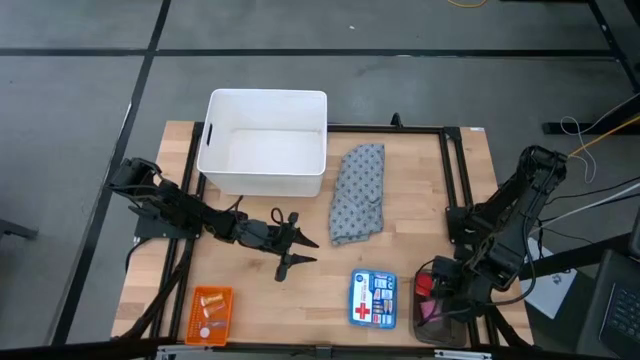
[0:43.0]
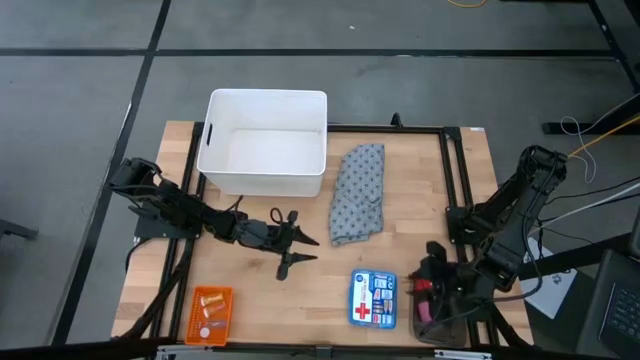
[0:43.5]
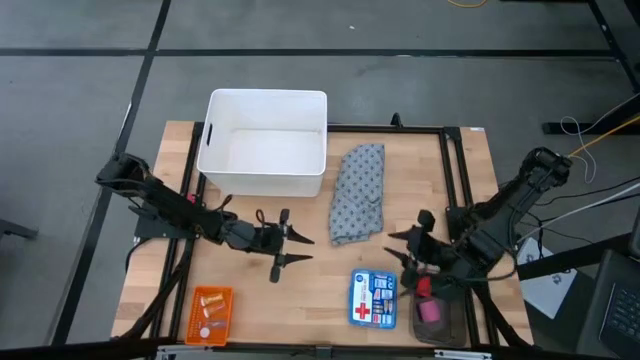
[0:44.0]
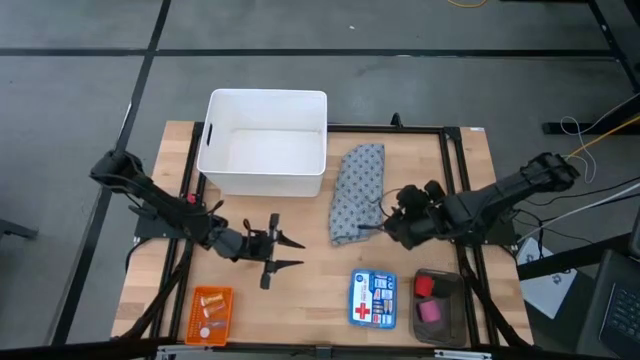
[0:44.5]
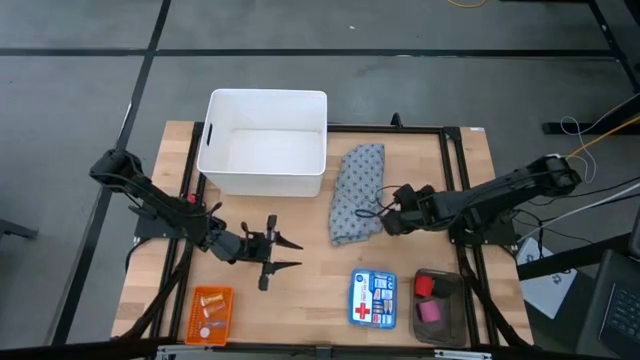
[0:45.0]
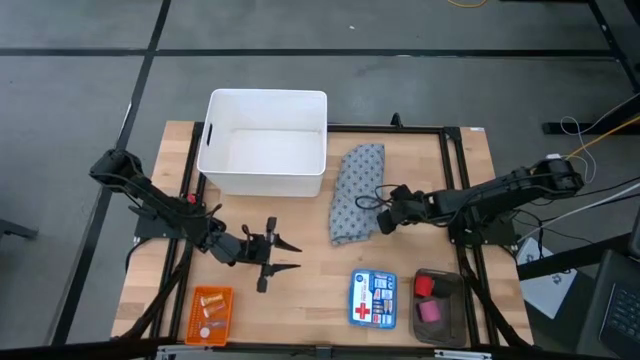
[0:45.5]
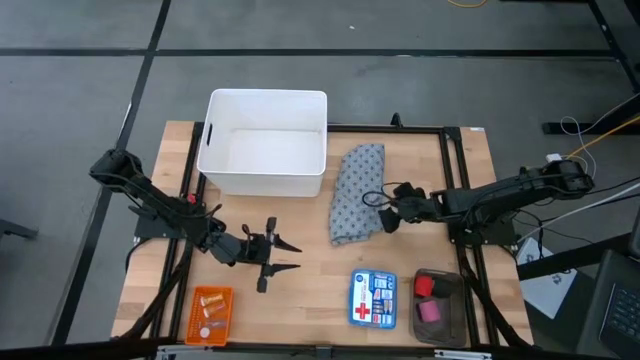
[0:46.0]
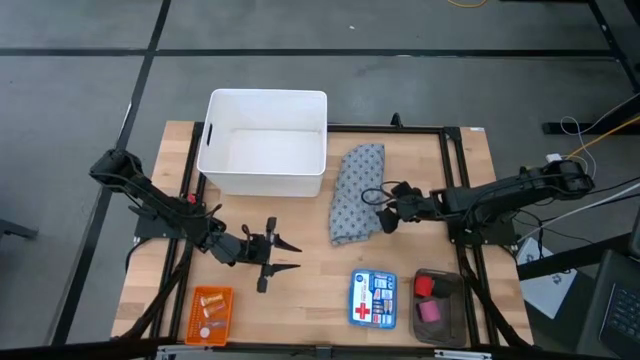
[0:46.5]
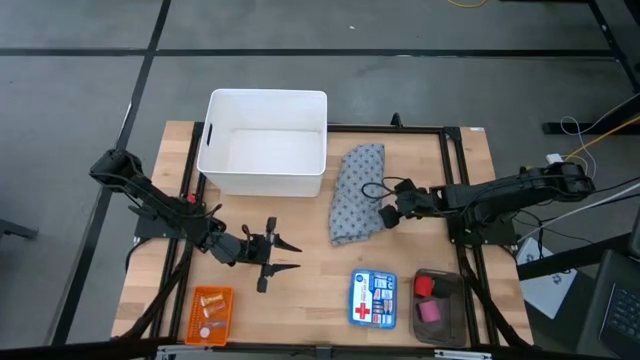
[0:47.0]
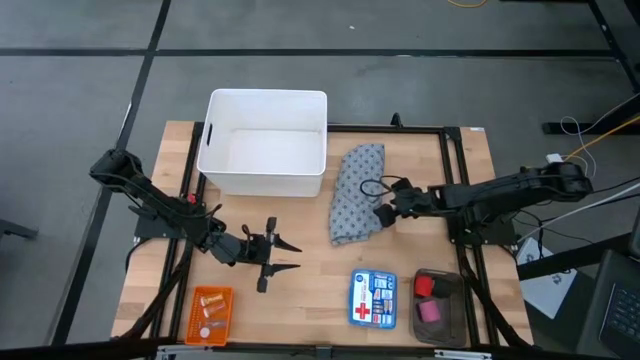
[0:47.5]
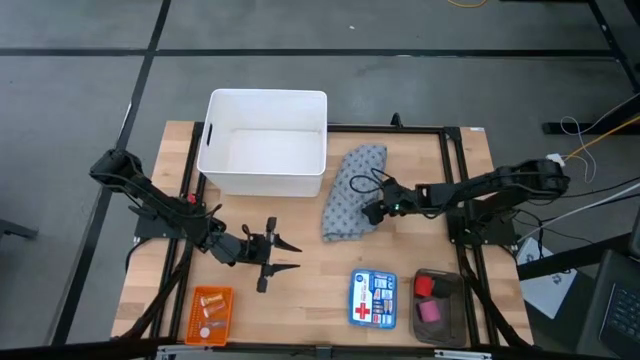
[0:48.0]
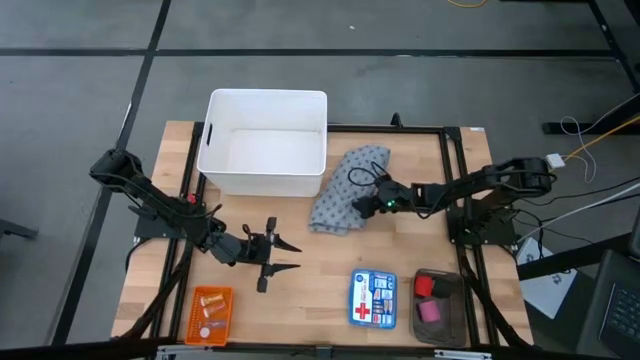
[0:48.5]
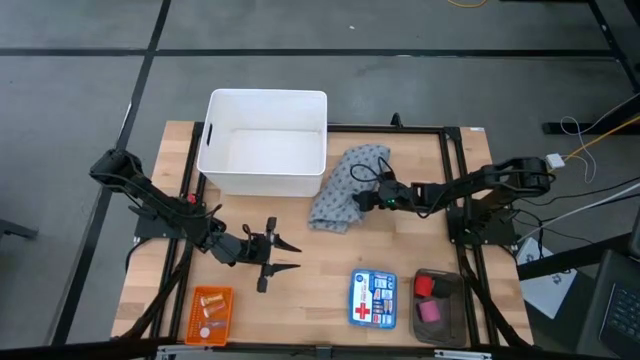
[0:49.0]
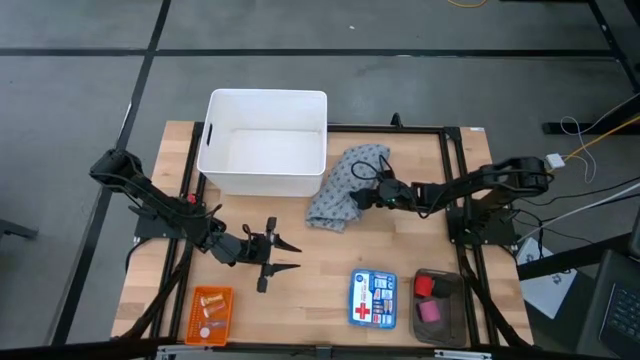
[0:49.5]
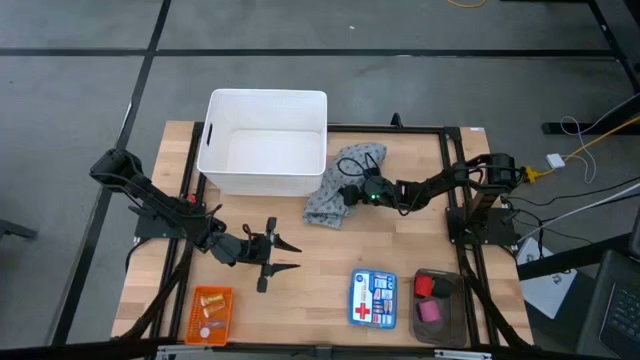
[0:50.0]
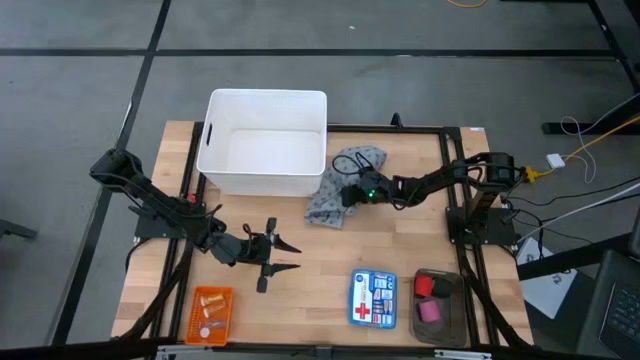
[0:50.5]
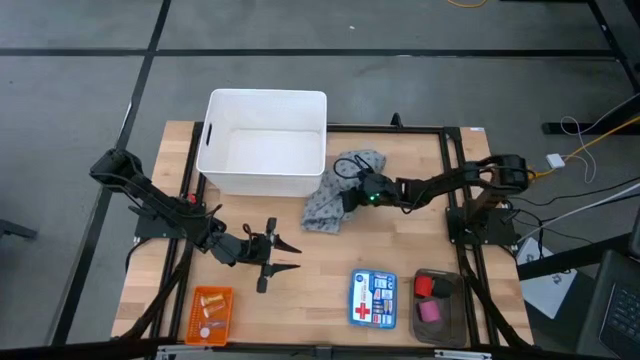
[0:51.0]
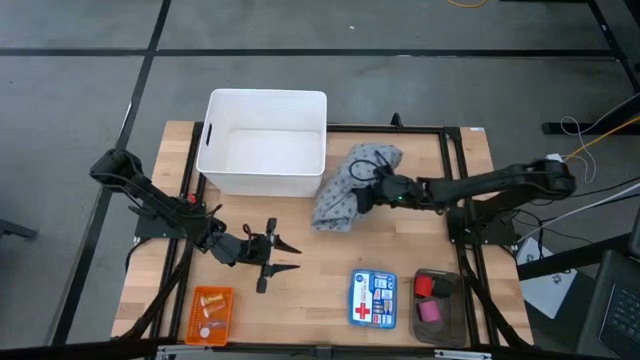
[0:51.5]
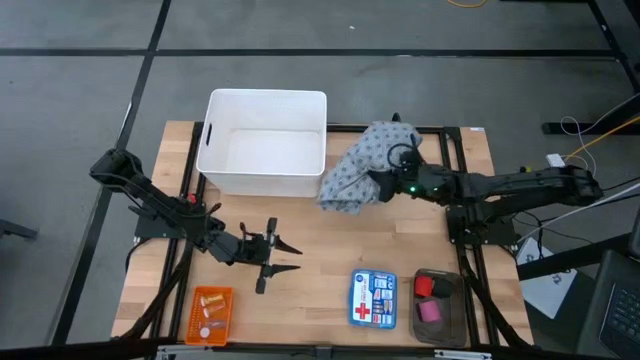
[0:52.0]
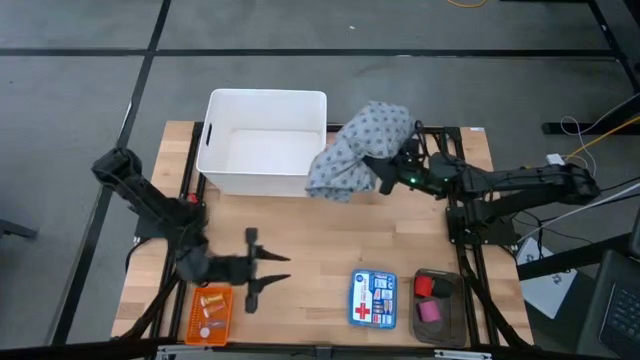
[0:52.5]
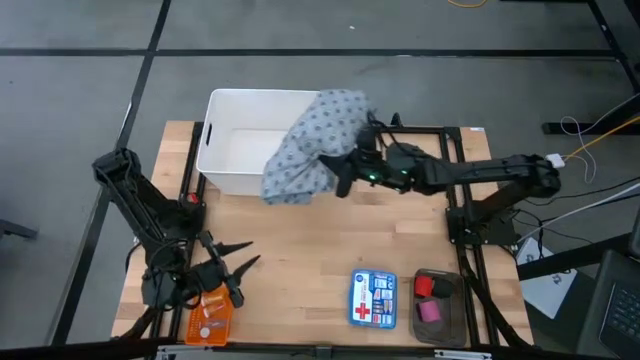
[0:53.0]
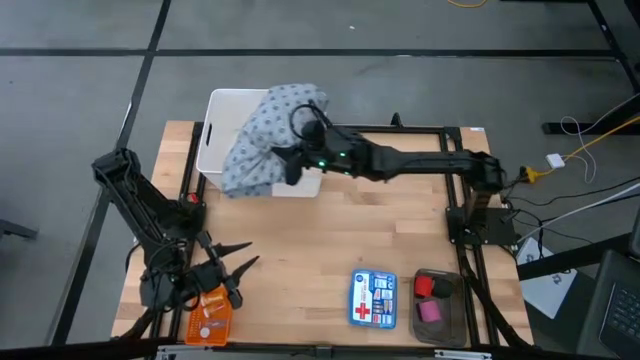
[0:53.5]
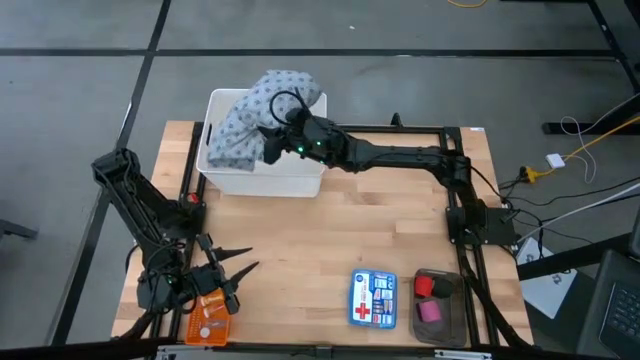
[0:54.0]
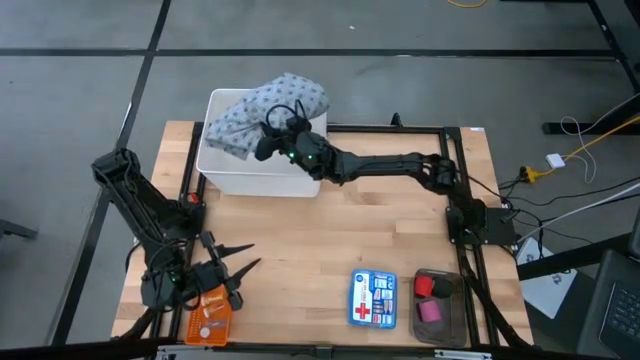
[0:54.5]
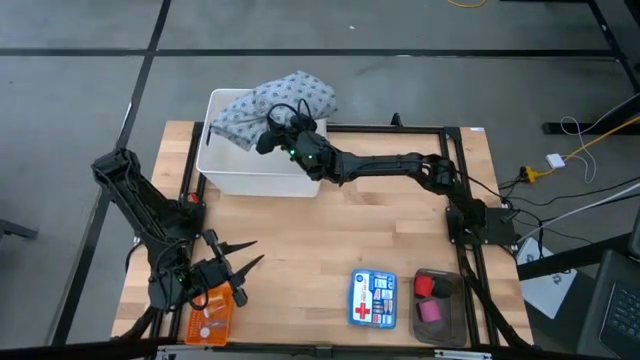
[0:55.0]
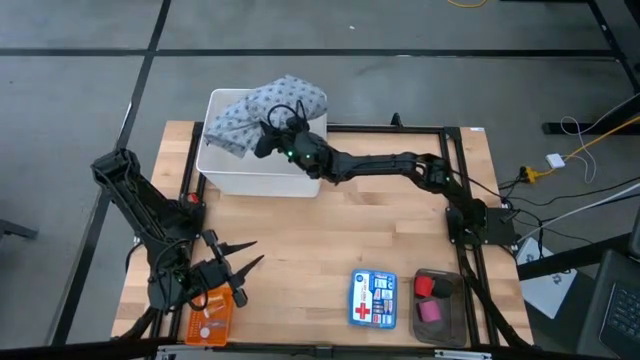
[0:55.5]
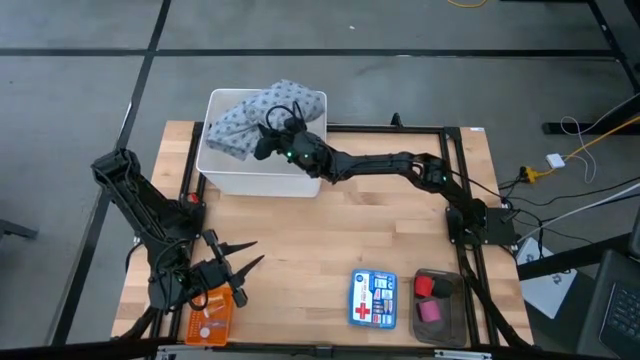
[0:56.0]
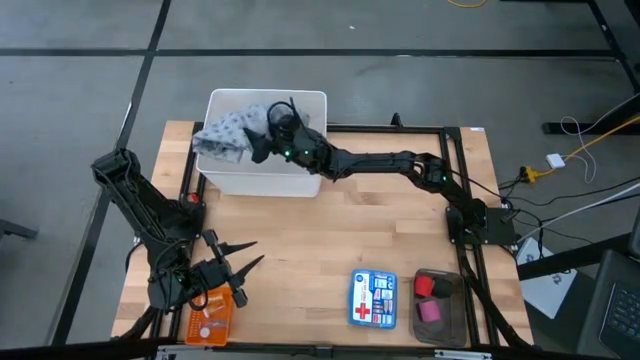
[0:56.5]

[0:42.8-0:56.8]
Task: Pick & place medical supplies in basket/bin
Put the patient gown into the white bin

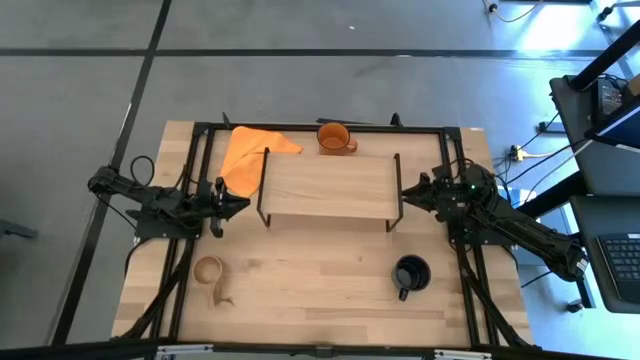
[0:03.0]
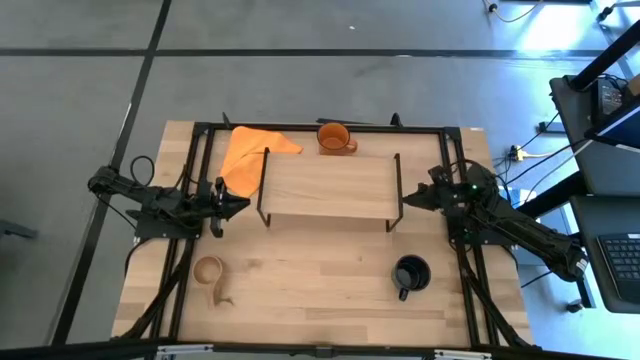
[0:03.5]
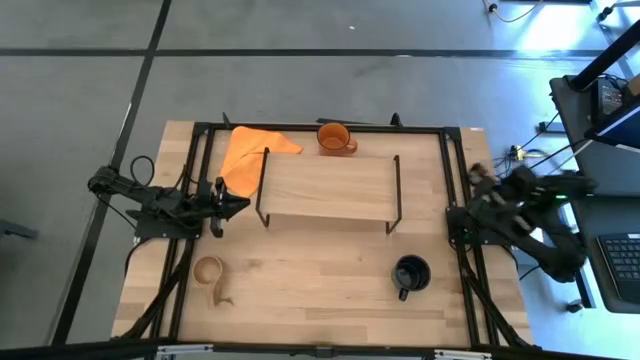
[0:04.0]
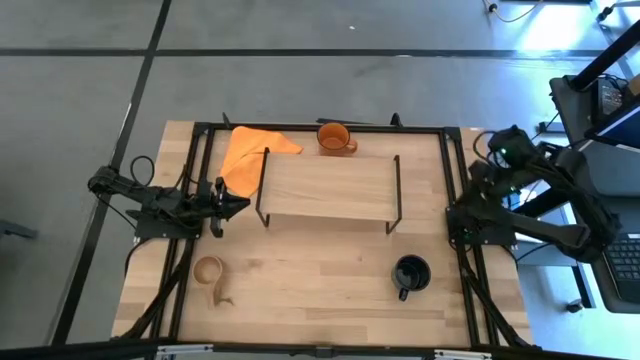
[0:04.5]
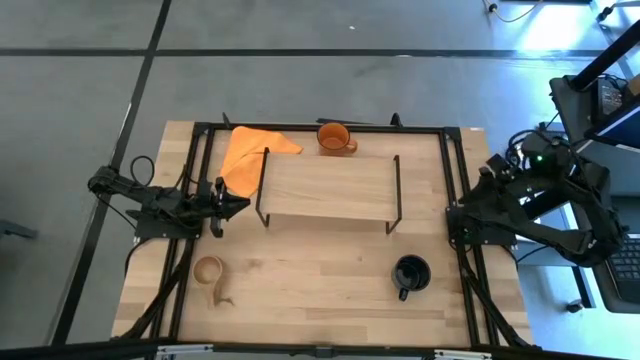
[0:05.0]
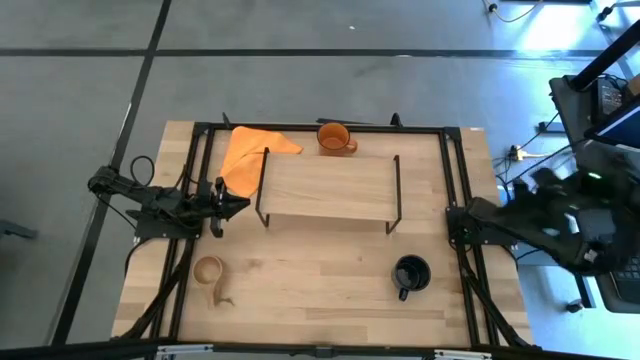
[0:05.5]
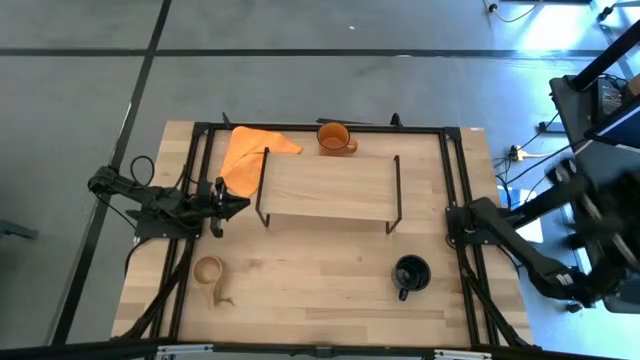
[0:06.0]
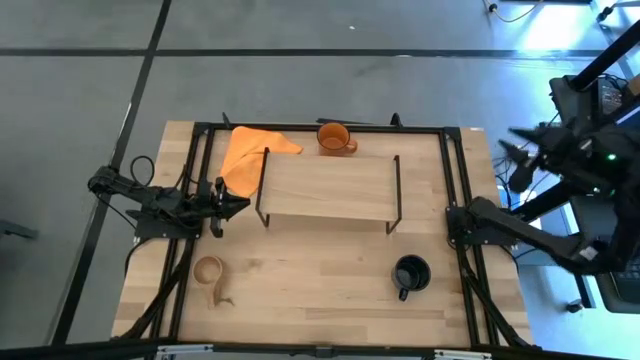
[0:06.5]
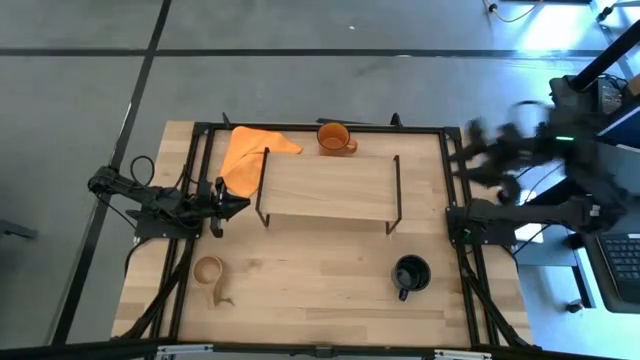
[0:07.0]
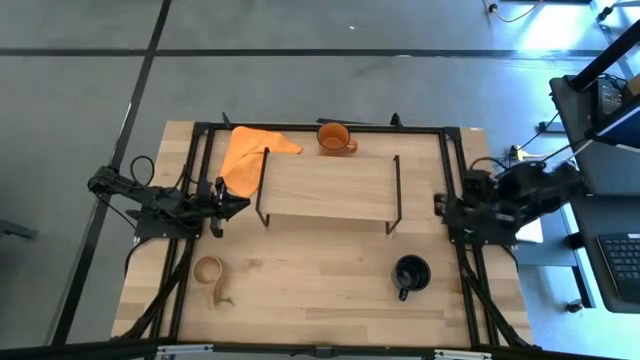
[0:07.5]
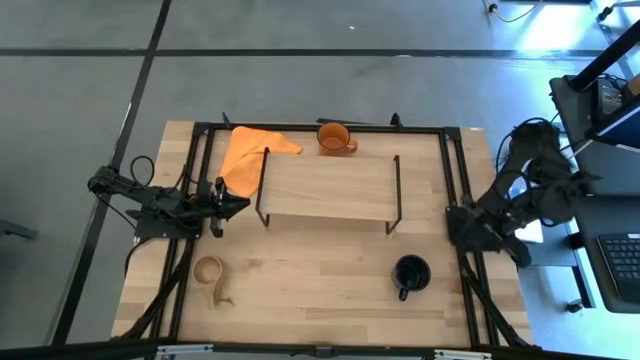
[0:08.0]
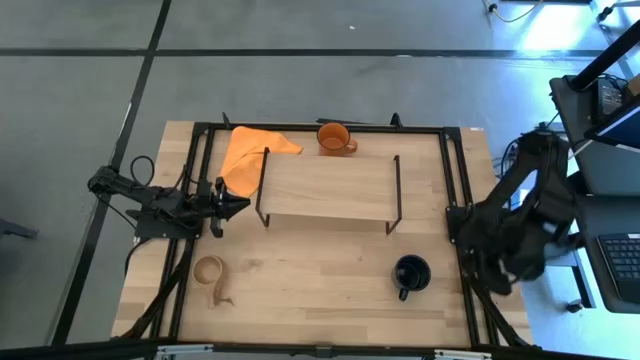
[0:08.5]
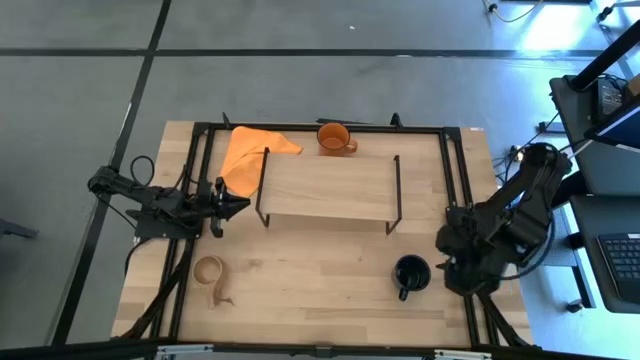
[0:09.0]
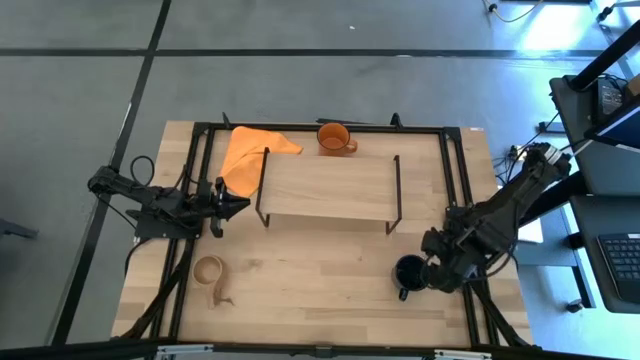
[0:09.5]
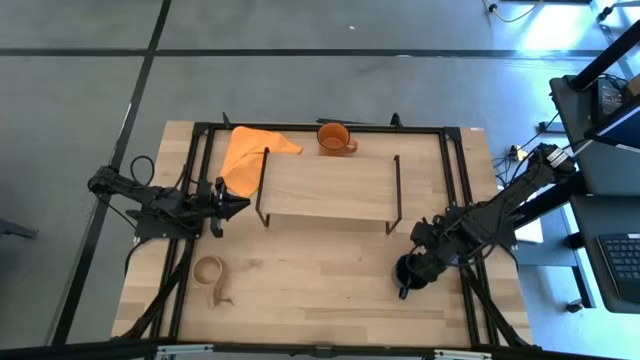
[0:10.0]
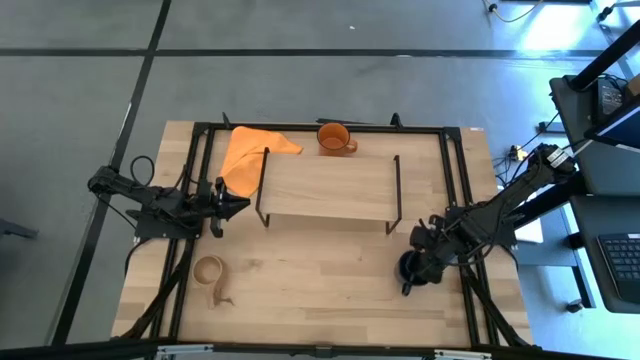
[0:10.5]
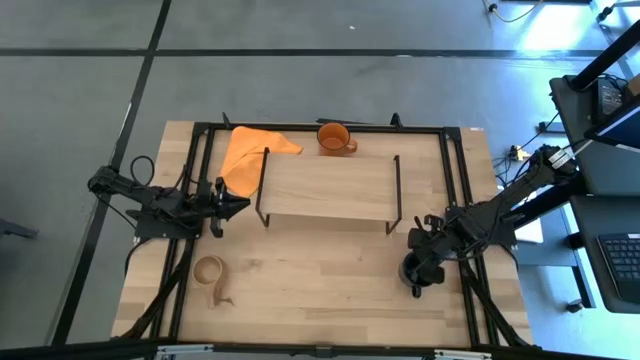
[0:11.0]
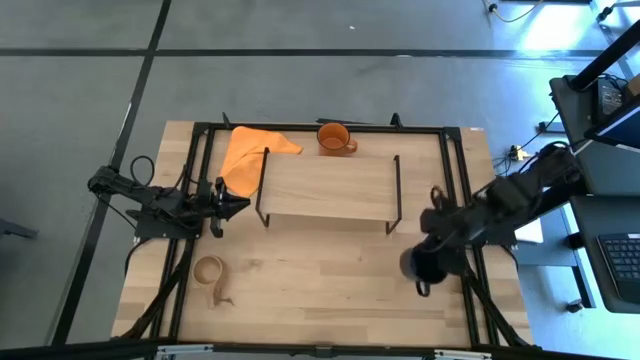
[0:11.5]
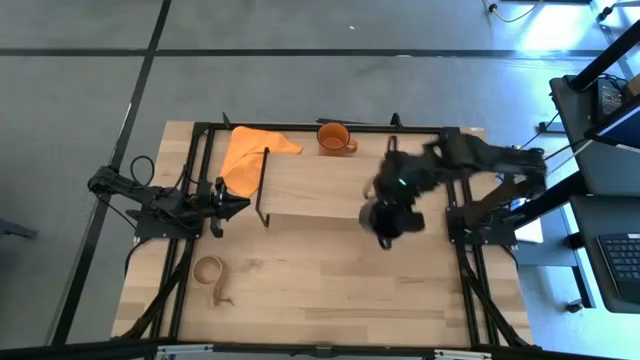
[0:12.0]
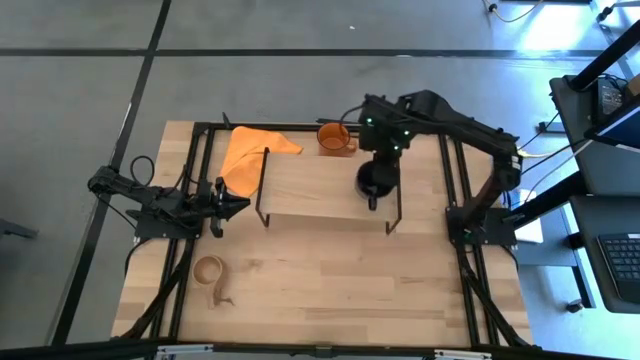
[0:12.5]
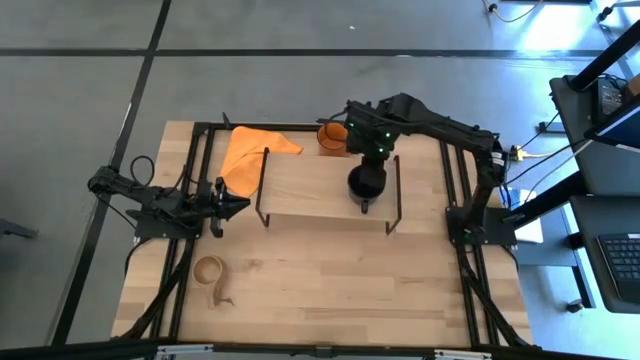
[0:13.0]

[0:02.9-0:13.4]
Task: Stack small to large cups/mugs on shelf
Put the blue mug on the shelf
